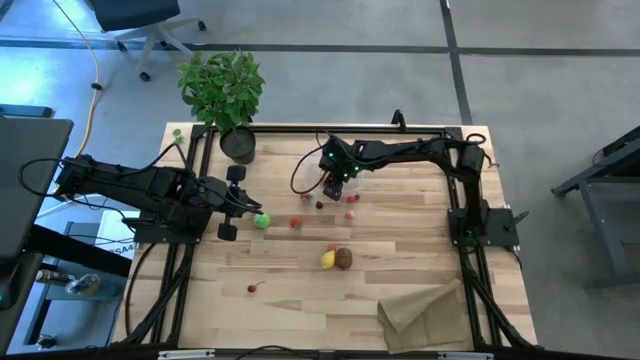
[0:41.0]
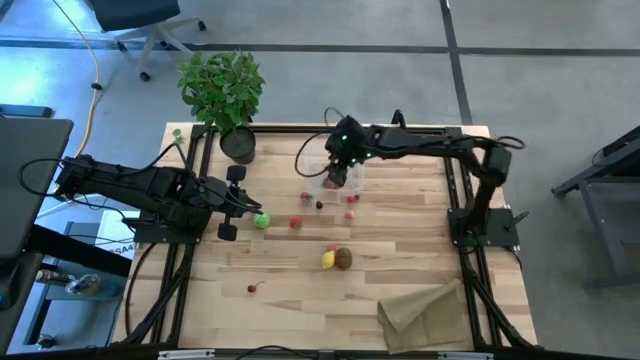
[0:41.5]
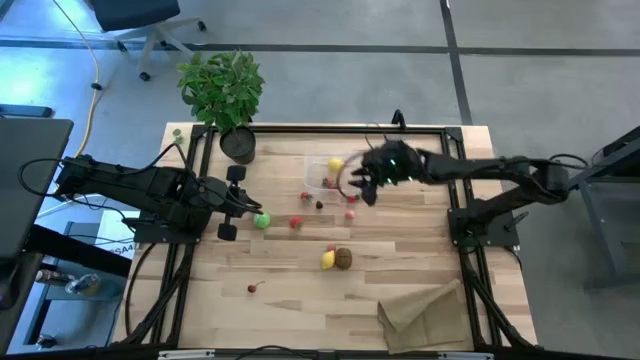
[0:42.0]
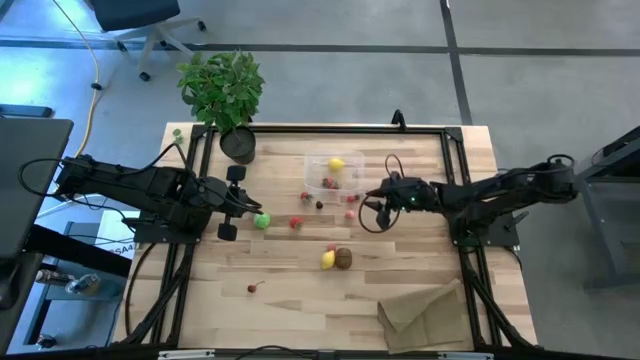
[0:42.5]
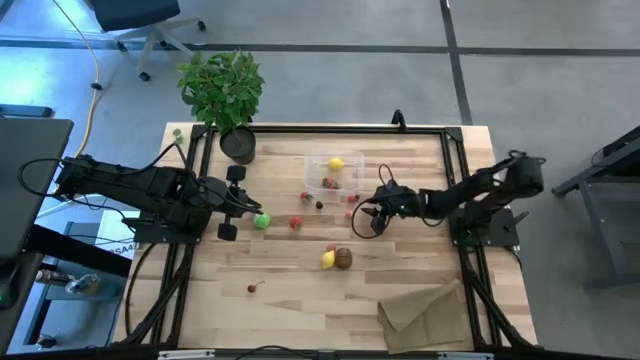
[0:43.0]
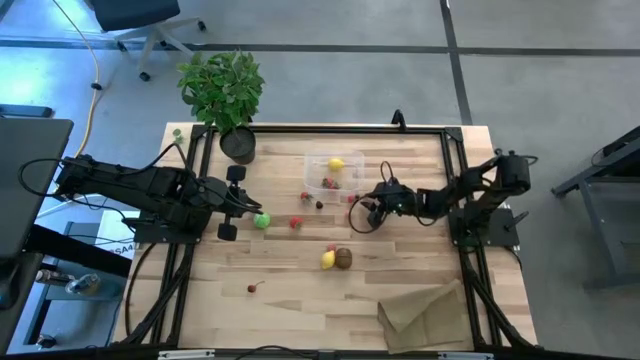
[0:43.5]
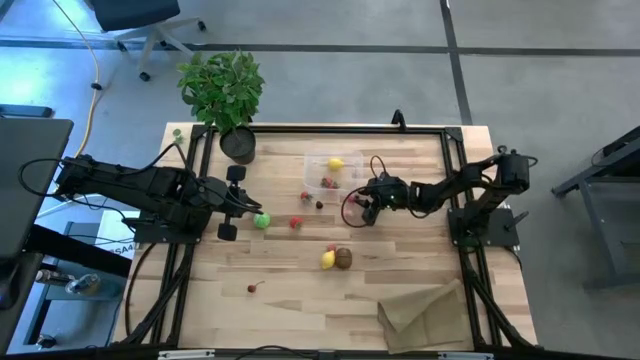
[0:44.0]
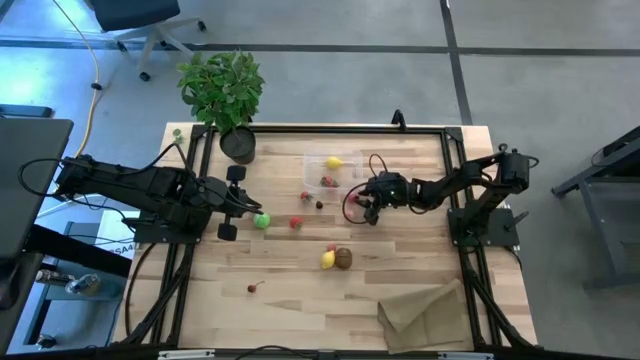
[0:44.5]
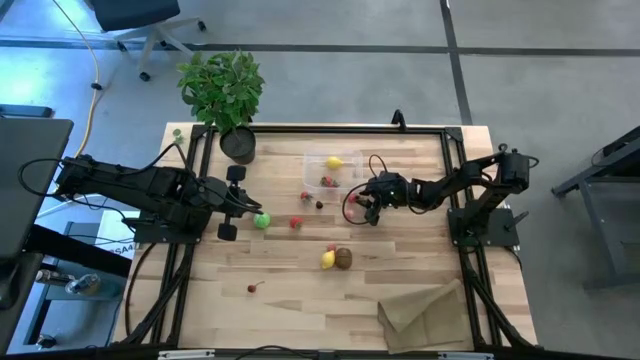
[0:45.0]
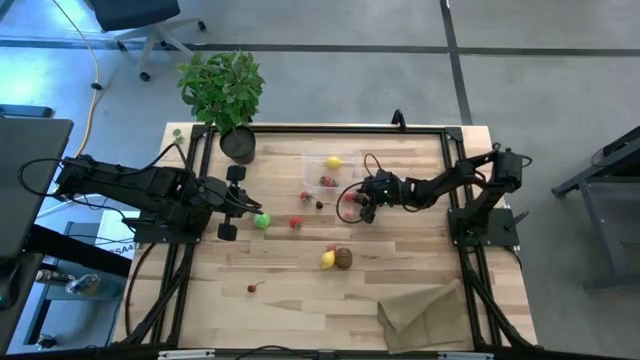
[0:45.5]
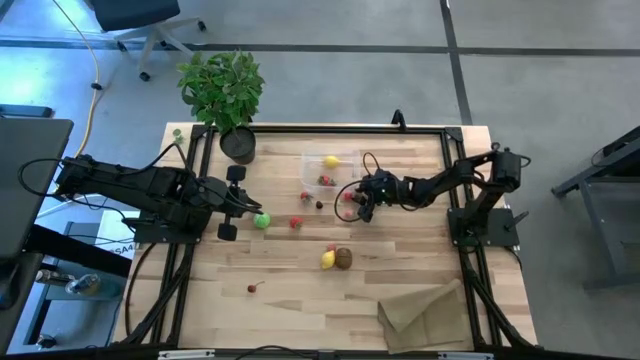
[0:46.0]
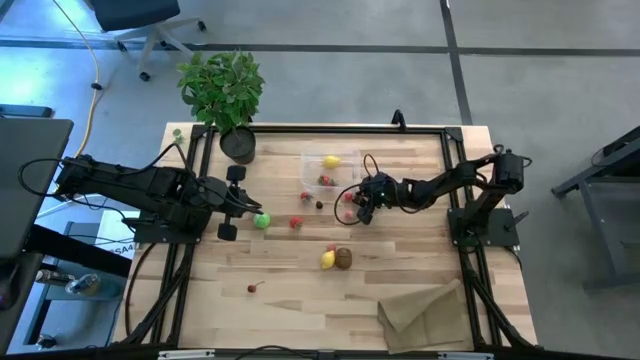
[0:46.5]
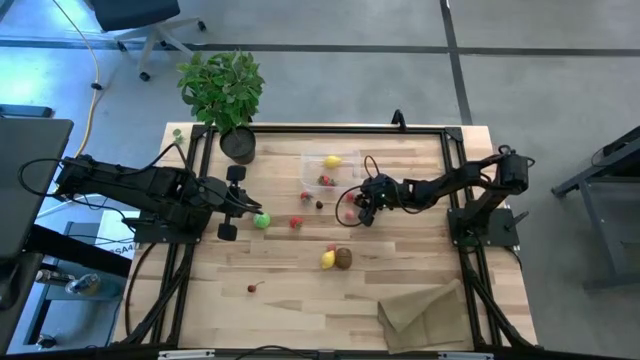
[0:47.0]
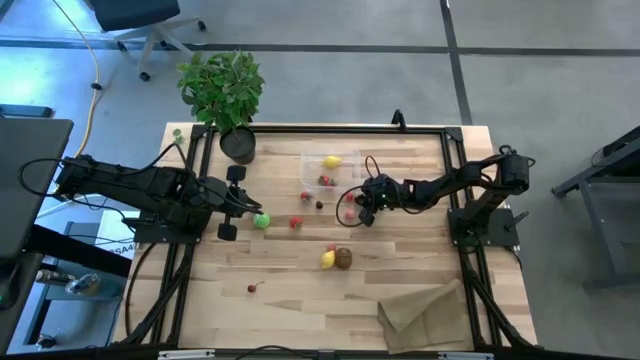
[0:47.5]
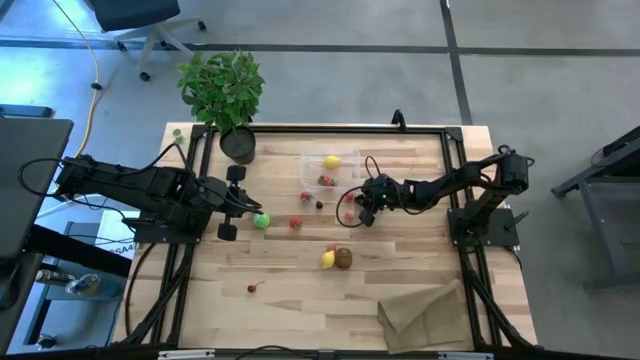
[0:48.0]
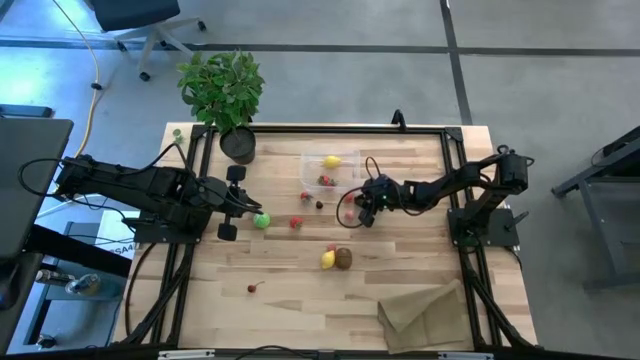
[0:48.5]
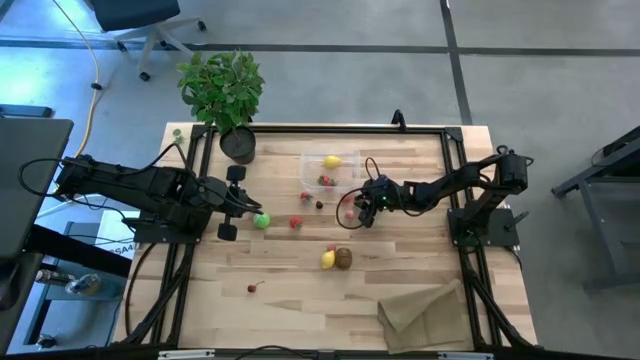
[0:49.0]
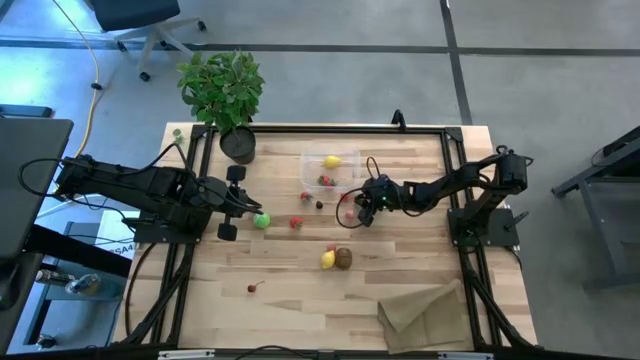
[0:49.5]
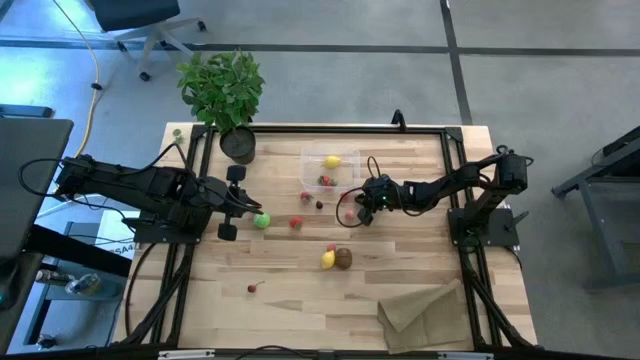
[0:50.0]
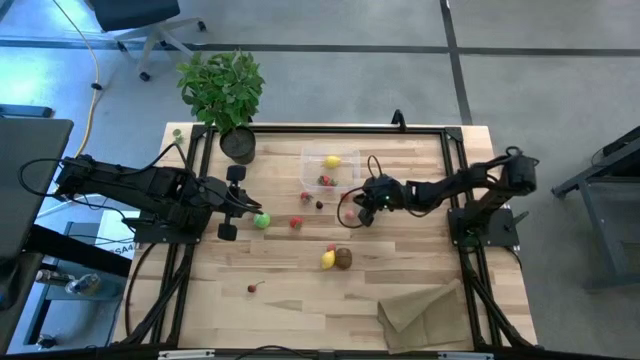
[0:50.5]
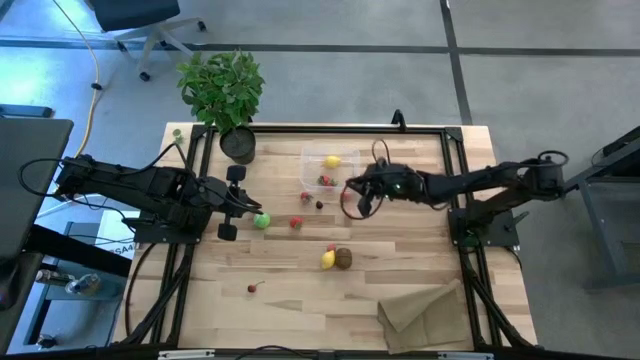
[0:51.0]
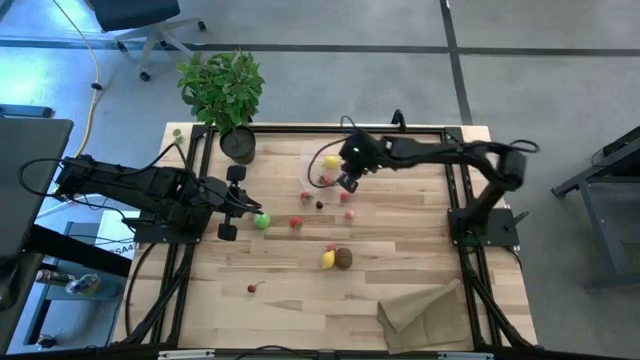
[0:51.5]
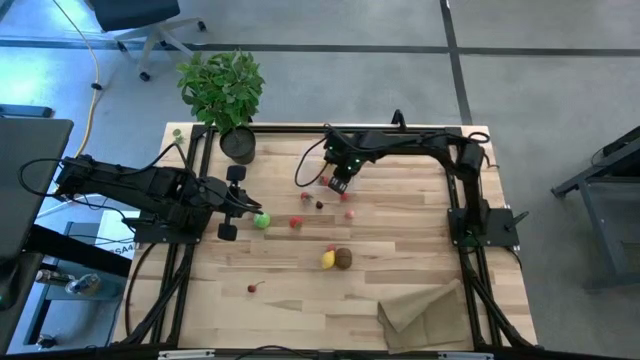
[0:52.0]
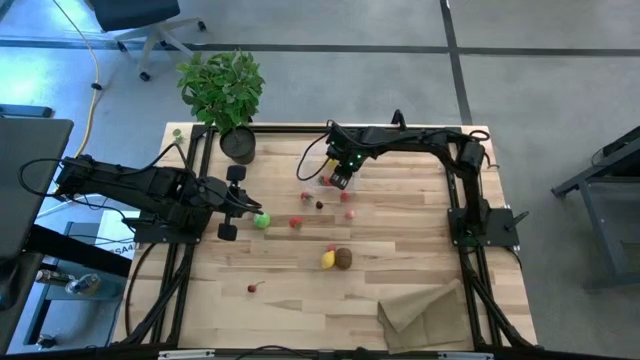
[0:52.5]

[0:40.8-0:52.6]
Task: Pick and placing Produce into tupperware
Put the blueberry into the transparent bin

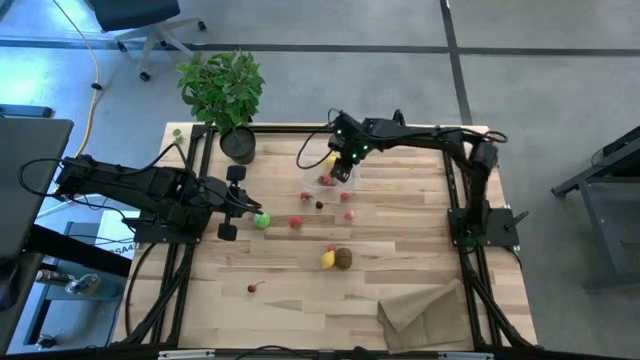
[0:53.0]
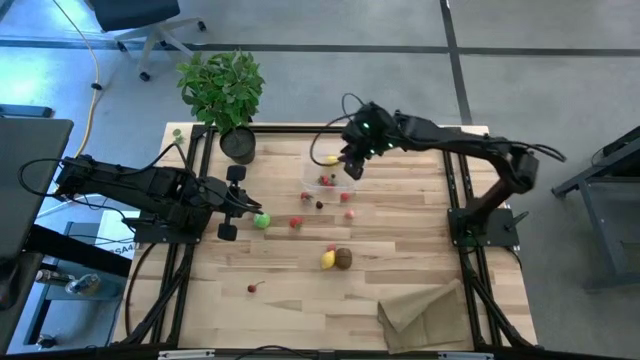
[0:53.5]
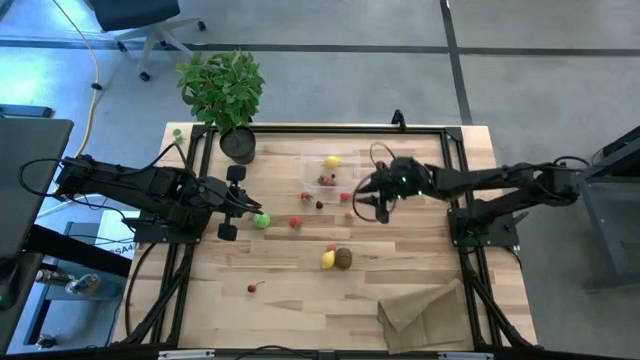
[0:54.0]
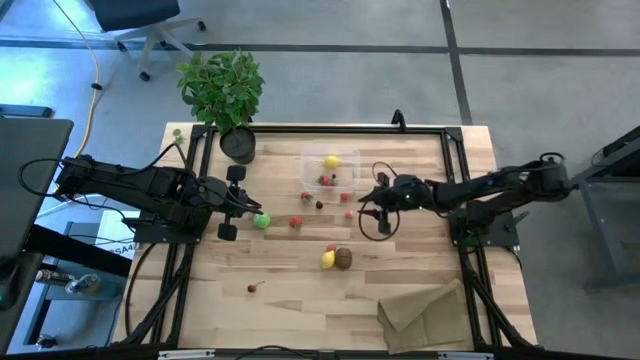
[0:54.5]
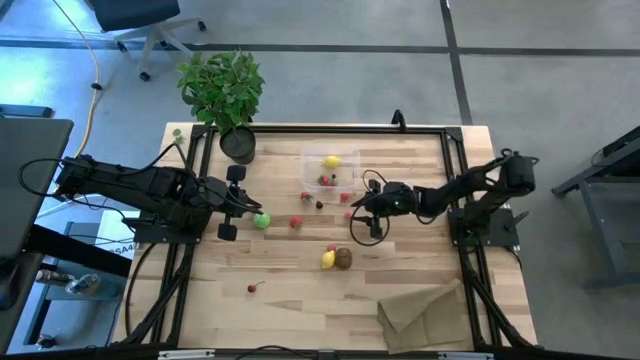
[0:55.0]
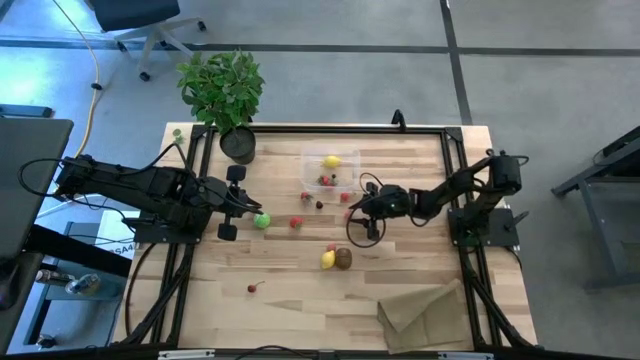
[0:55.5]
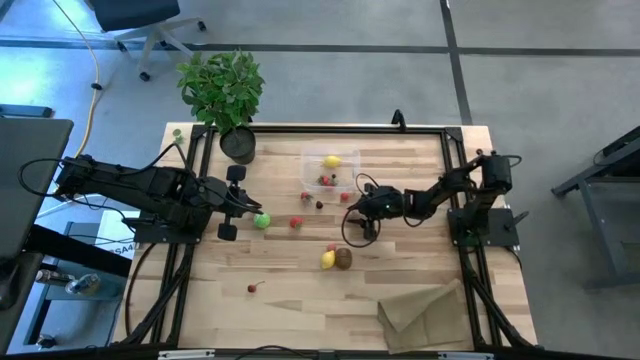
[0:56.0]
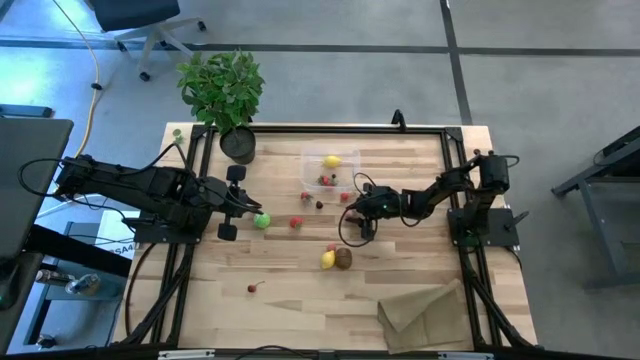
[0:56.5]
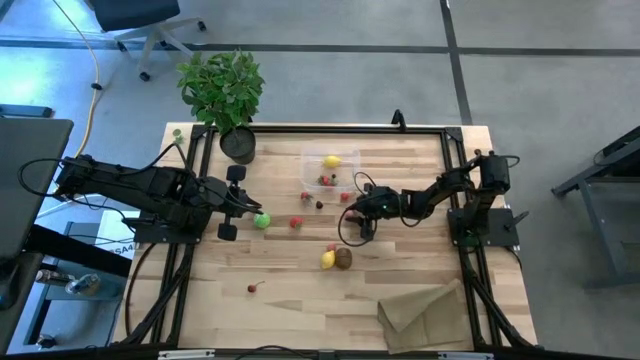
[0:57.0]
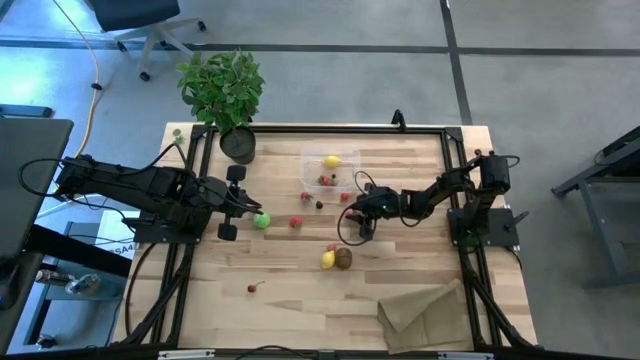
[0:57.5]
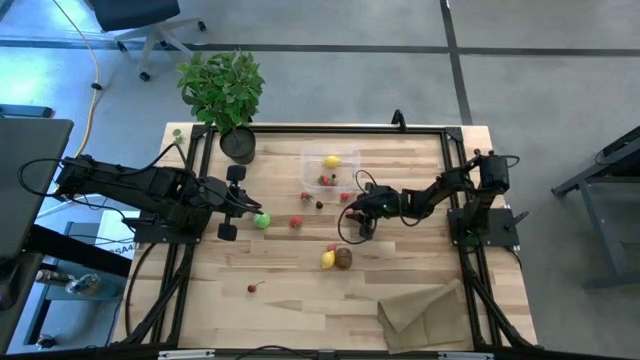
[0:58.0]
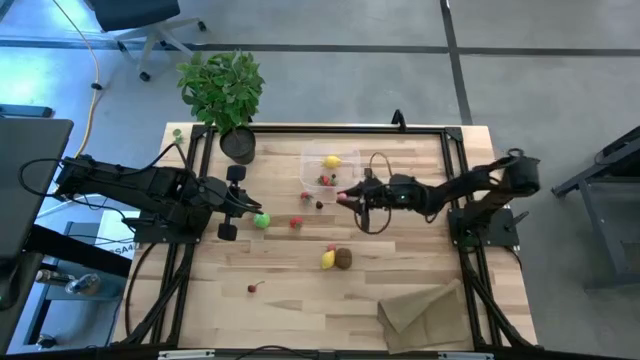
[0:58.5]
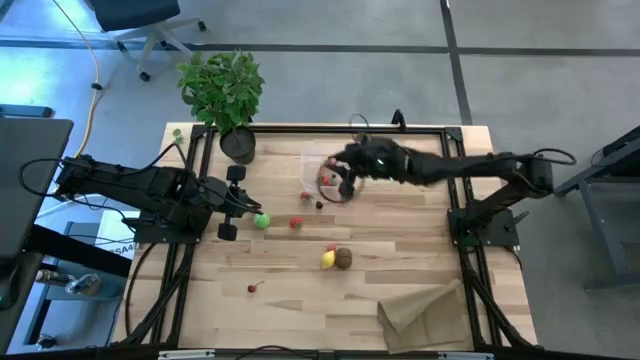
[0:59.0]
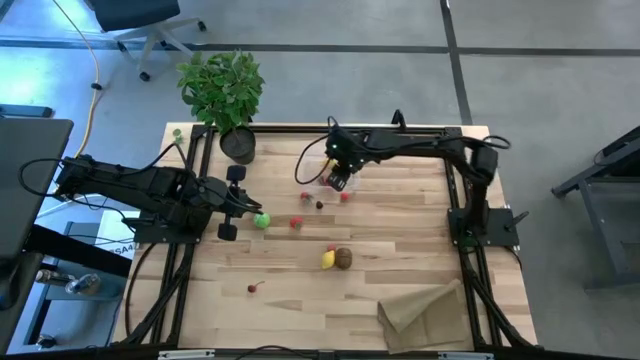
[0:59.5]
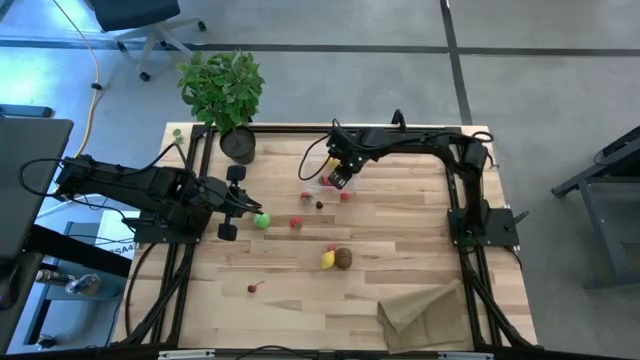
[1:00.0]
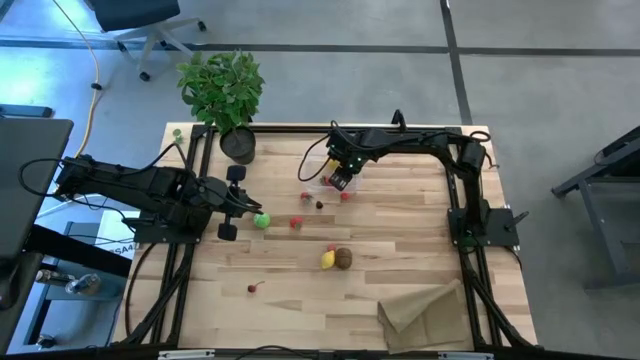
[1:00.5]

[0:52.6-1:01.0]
Put the top peach into transparent bin

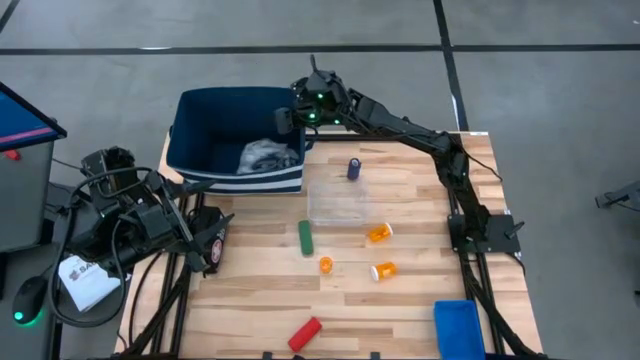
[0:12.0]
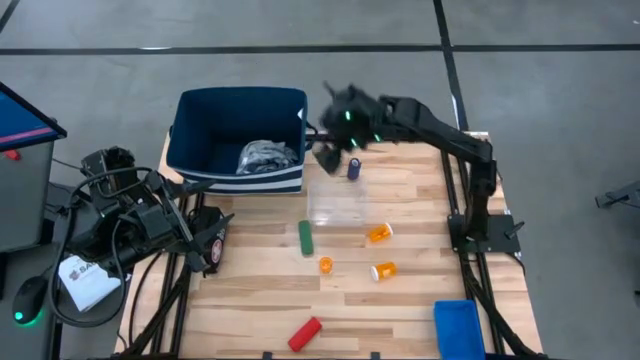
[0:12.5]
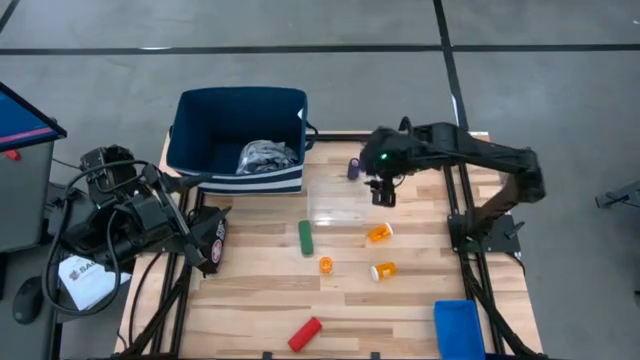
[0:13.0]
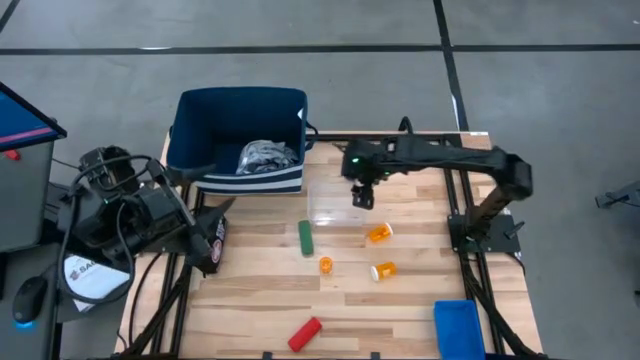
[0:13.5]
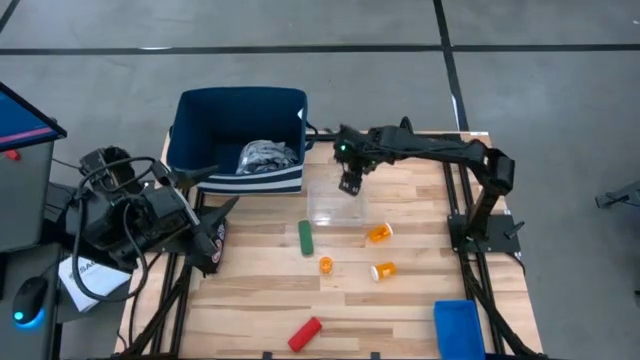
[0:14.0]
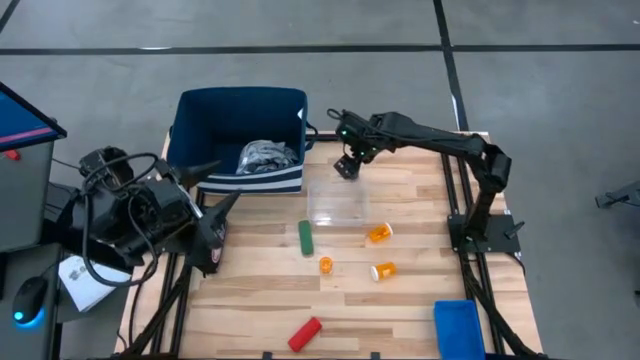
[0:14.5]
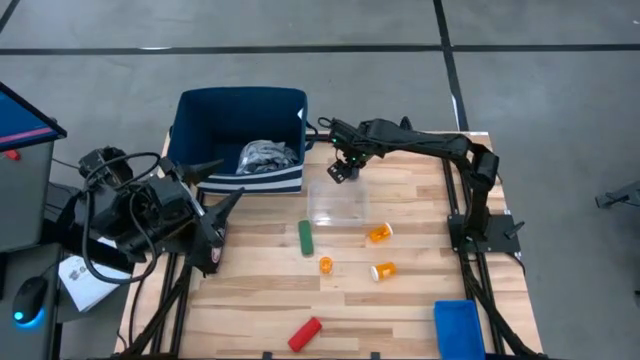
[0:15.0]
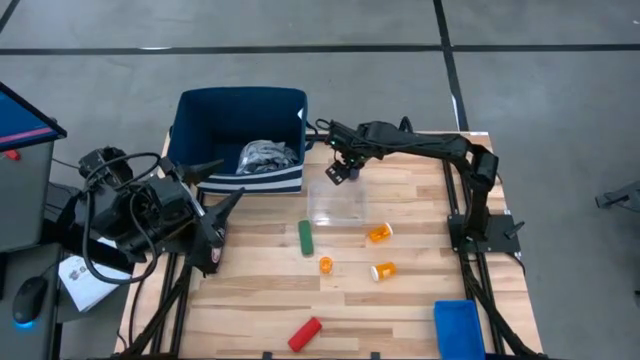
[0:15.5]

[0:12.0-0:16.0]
Task: Pick & place medical supplies in basket/bin
Put the blue bandage into the transparent bin
